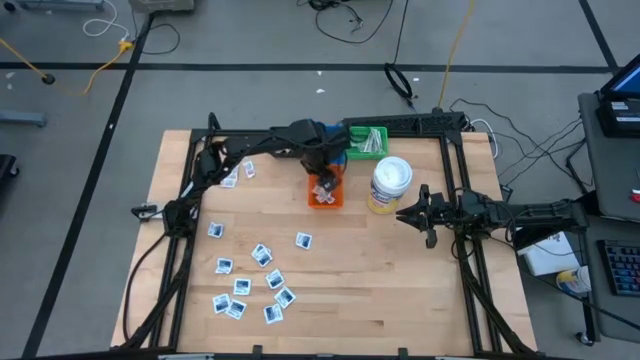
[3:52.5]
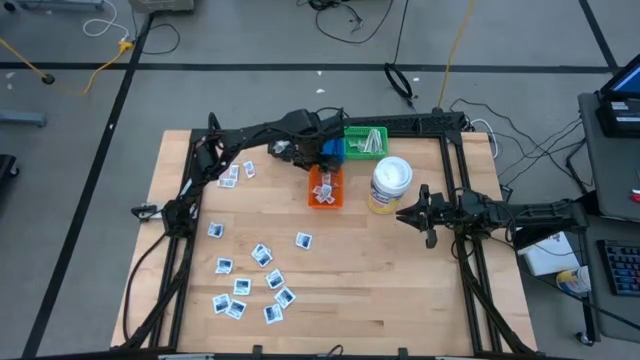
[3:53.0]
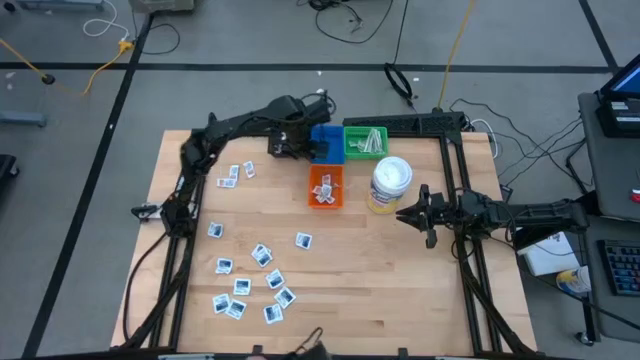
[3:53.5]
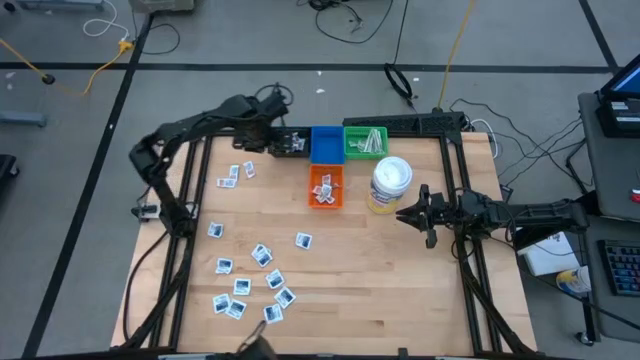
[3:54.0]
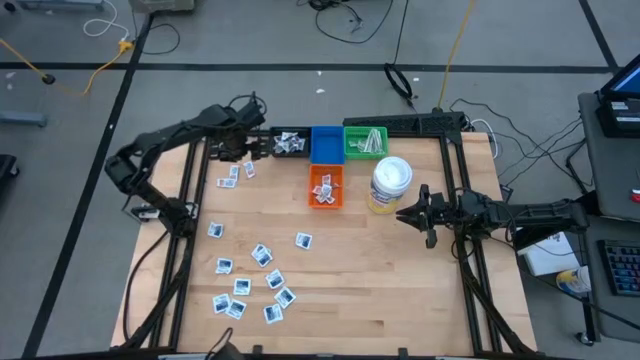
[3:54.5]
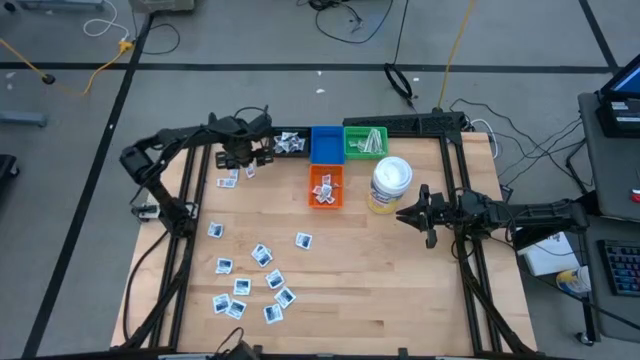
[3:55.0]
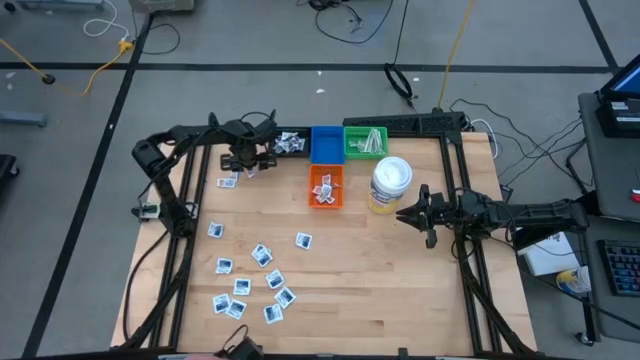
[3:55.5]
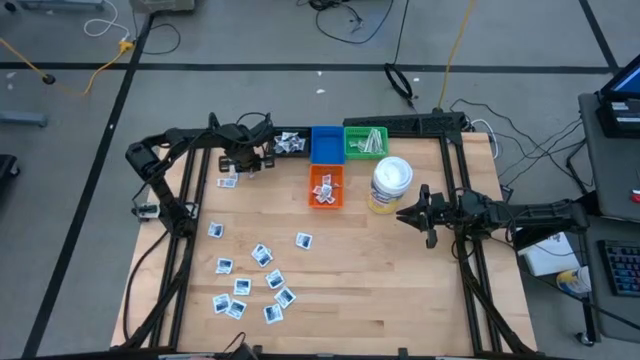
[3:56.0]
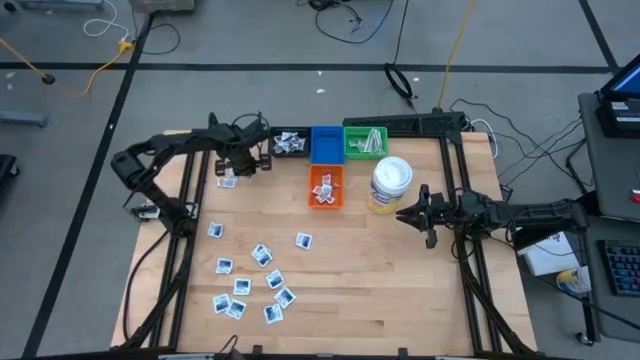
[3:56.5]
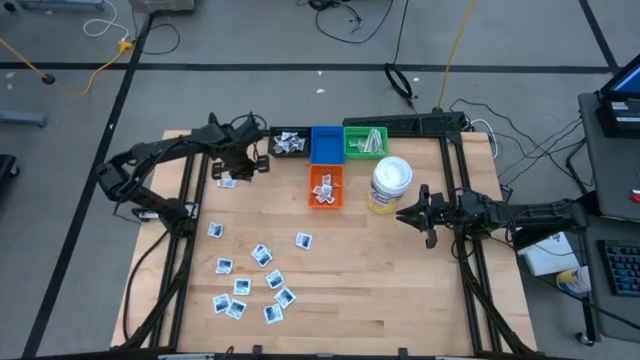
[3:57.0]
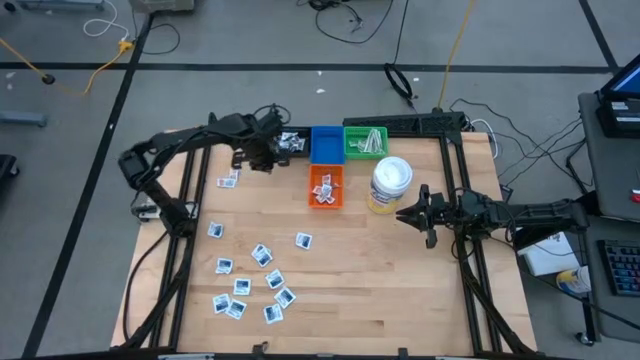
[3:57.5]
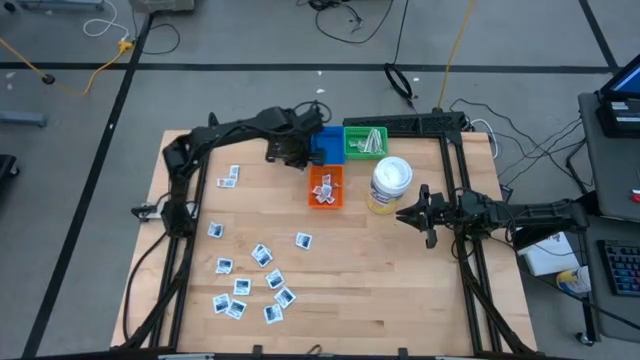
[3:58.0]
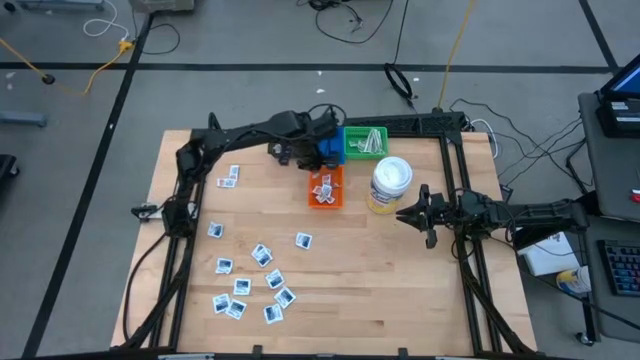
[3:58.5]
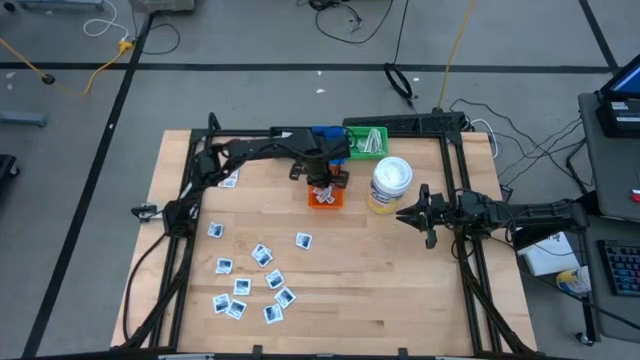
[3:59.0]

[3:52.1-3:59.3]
Task: Pick & Place First Aid Supplies
Put the orange ointment pack into the orange bin

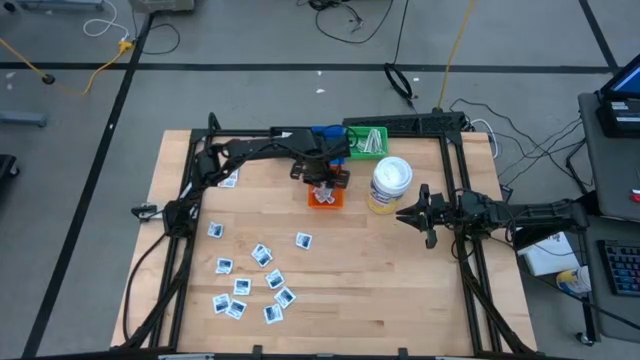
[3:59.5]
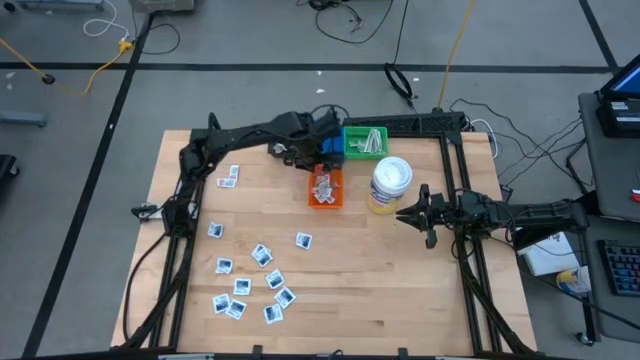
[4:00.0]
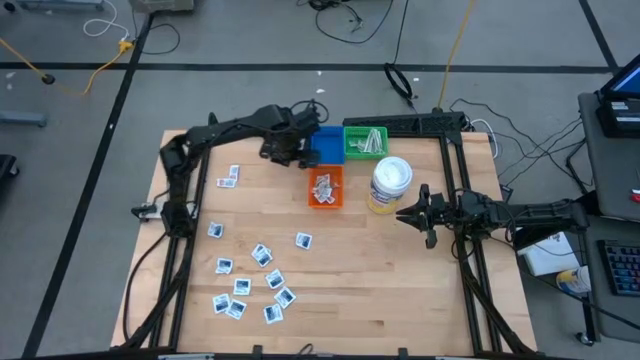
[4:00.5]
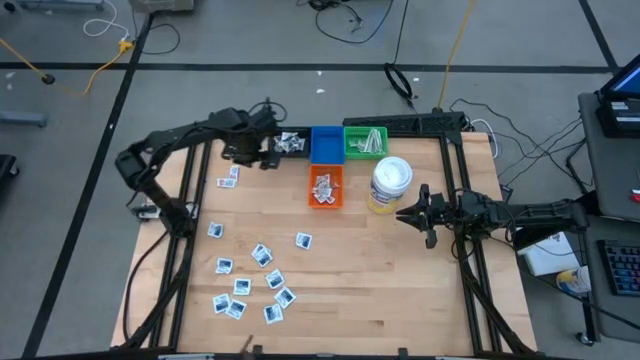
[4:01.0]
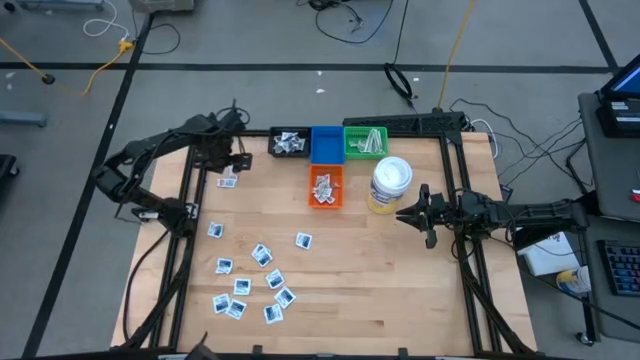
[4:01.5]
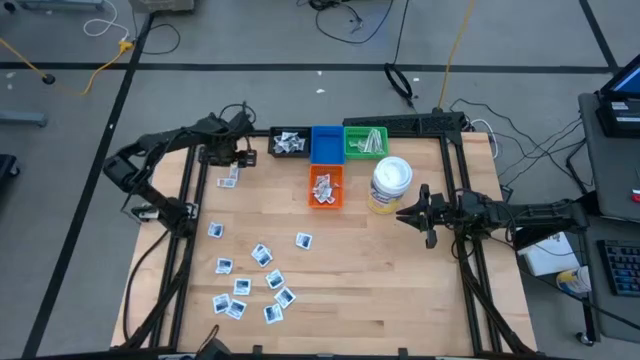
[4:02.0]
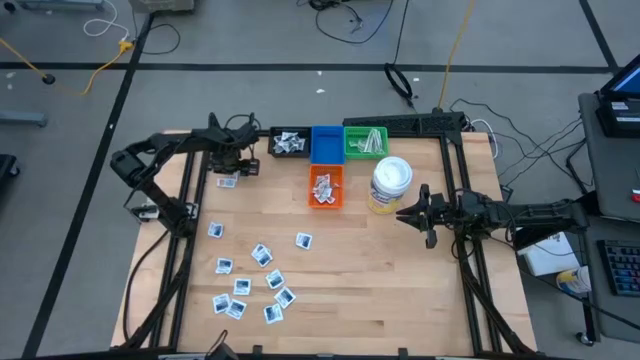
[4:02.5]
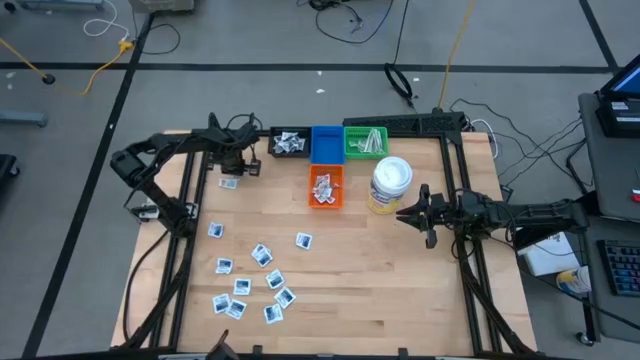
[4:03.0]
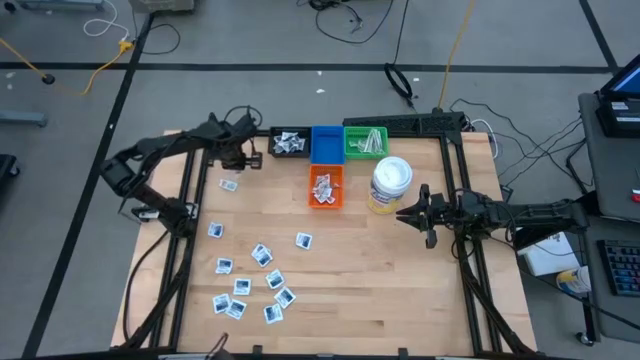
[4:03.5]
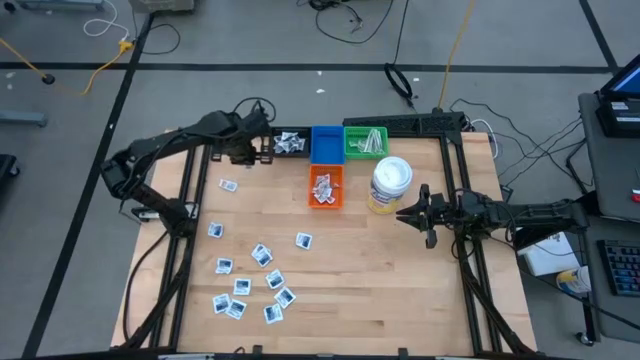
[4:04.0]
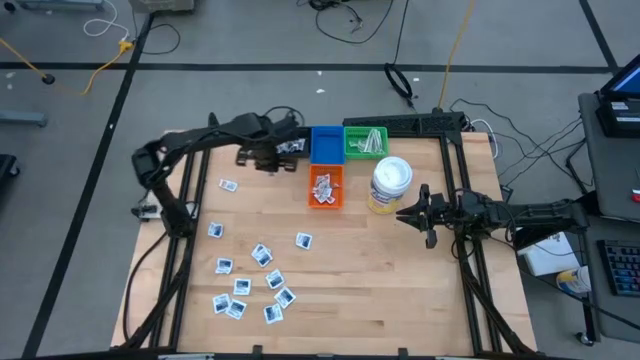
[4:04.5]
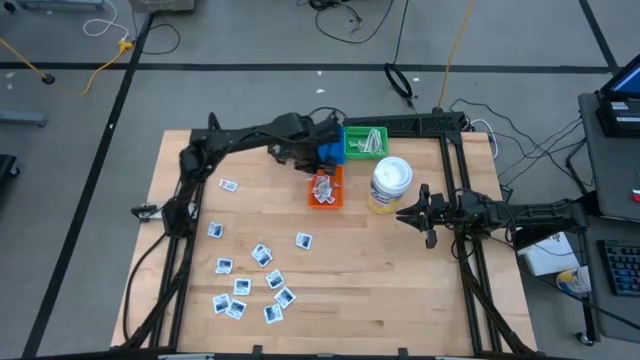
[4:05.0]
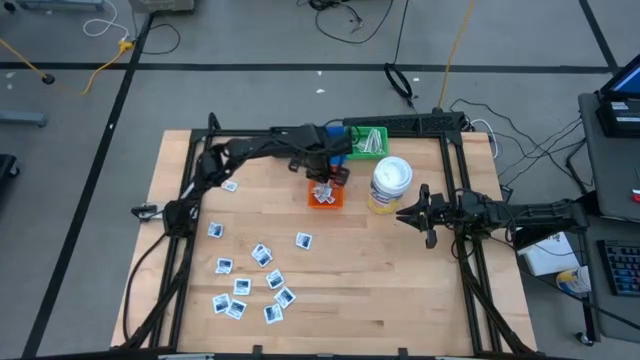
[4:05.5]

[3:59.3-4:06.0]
Put the orange ointment pack into the orange bin

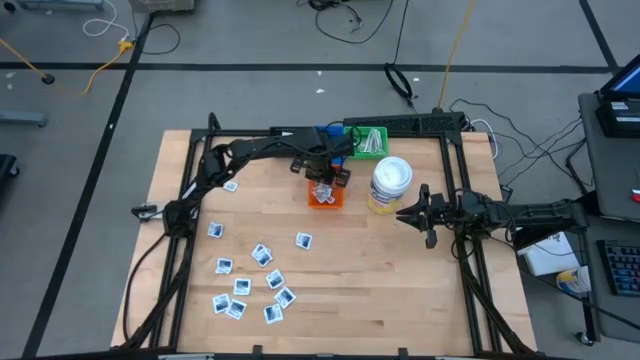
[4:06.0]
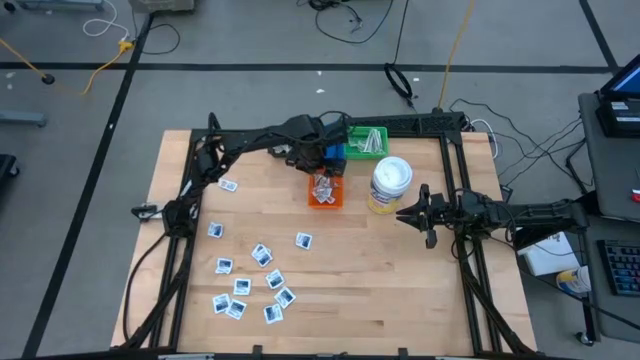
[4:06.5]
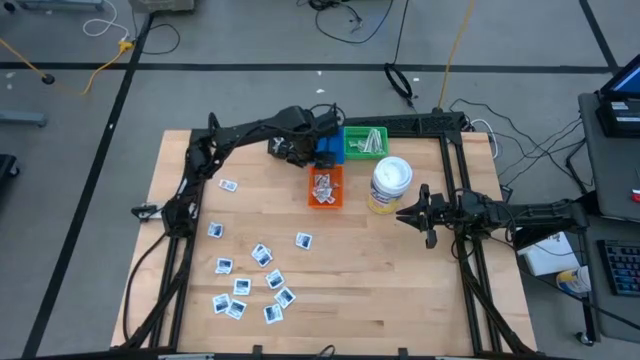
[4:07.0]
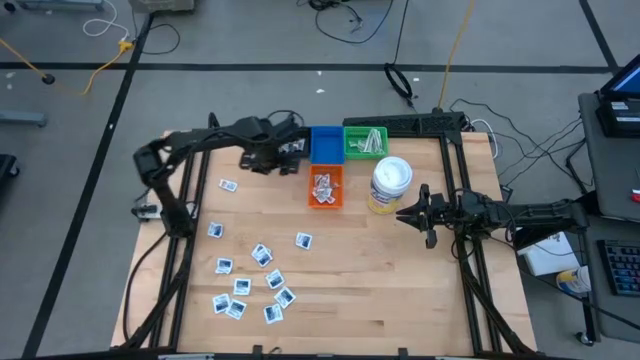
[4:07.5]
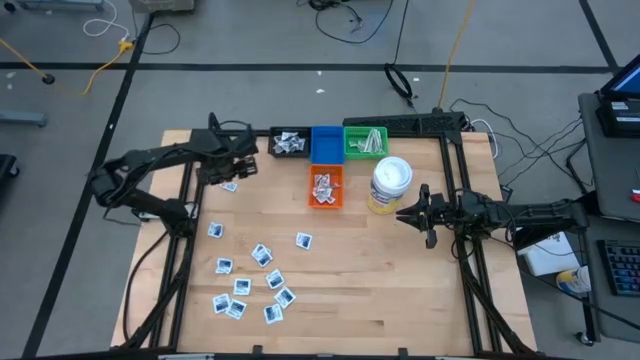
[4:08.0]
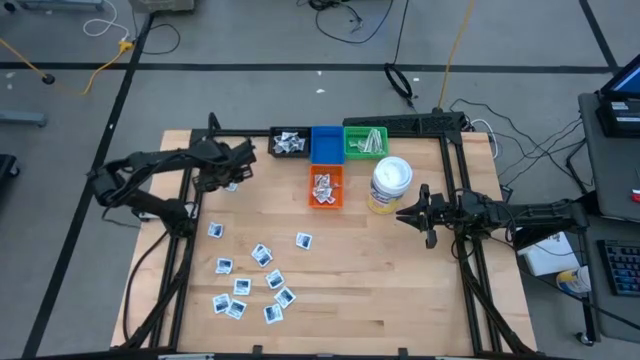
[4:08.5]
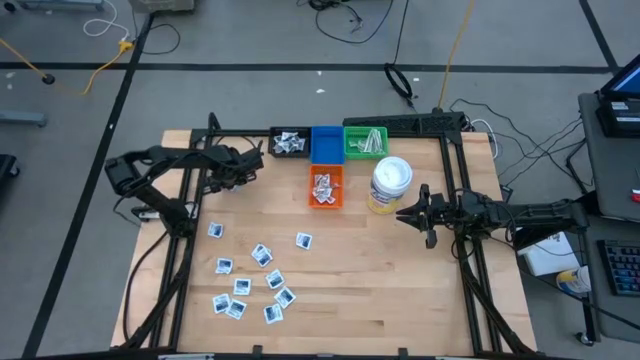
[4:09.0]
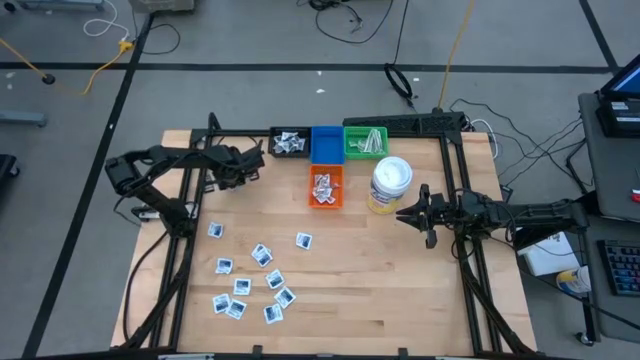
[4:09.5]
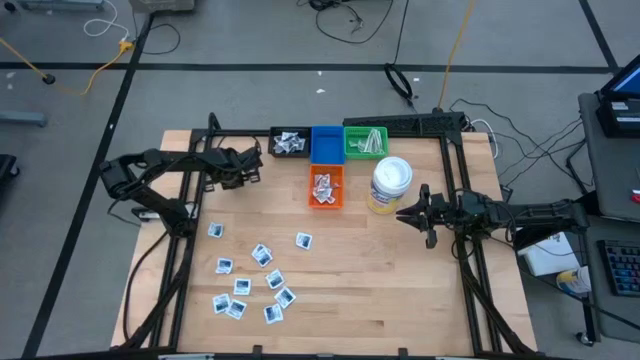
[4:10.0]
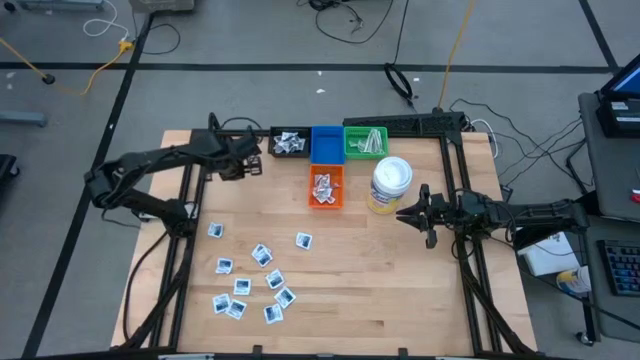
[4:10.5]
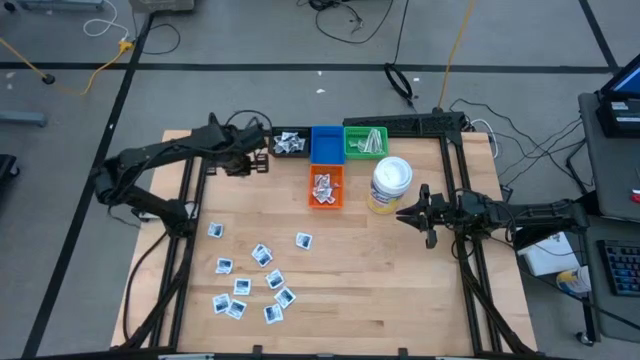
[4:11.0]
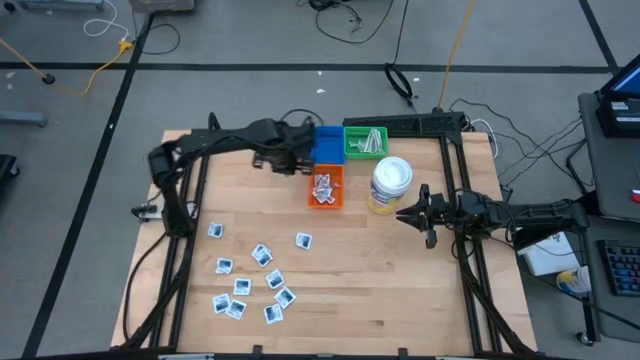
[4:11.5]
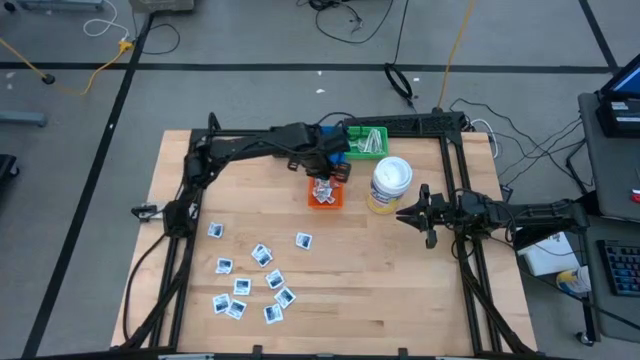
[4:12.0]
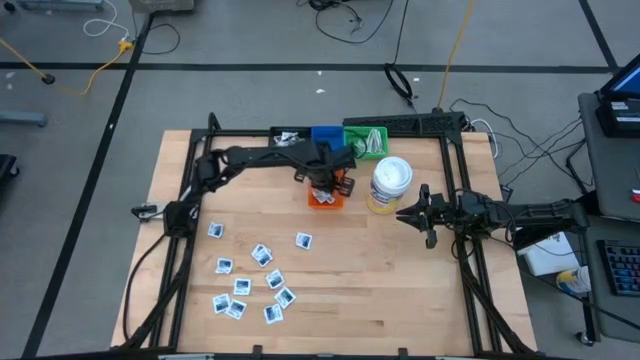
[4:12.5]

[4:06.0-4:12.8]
Put the orange ointment pack into the orange bin

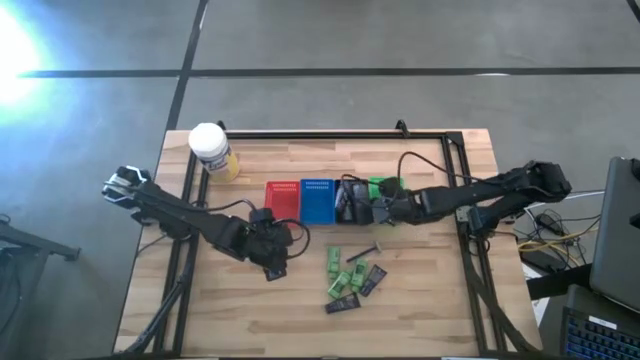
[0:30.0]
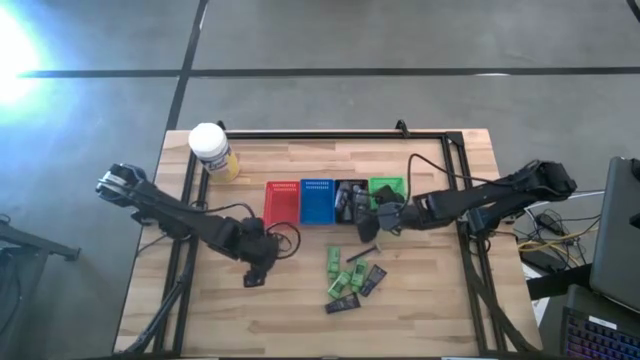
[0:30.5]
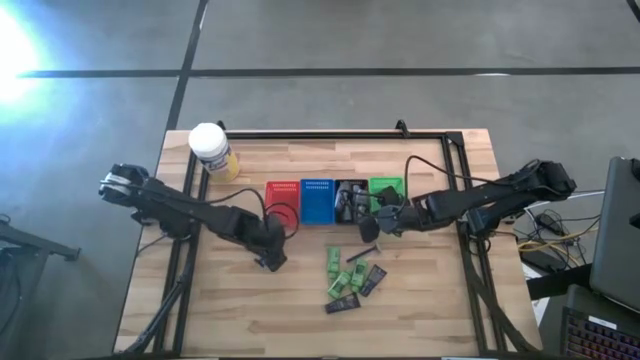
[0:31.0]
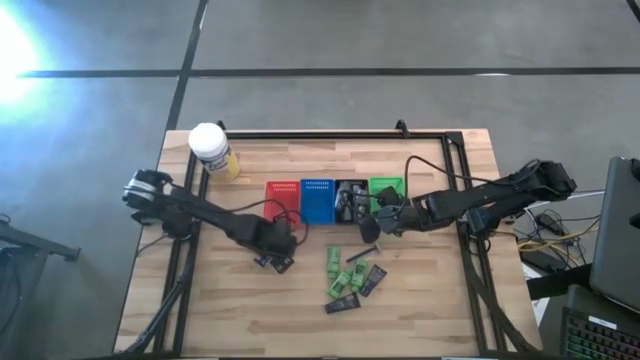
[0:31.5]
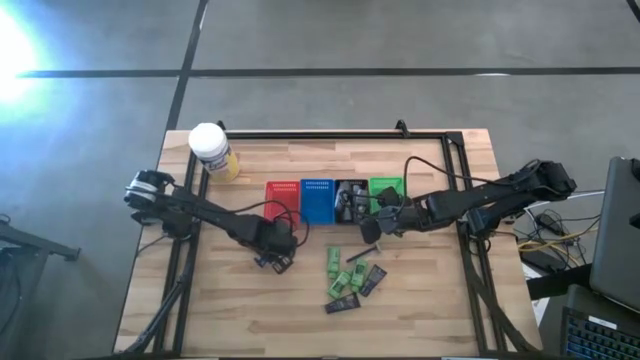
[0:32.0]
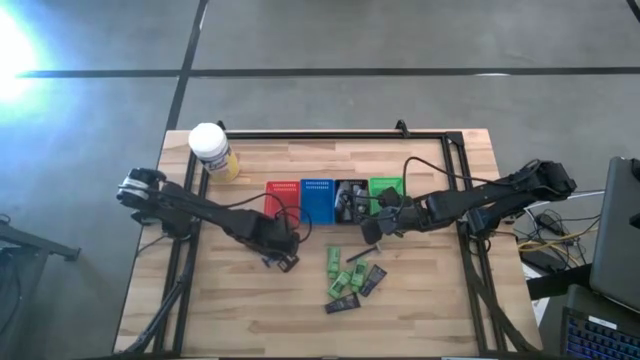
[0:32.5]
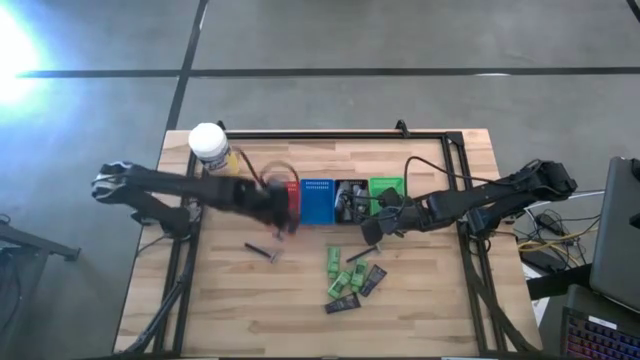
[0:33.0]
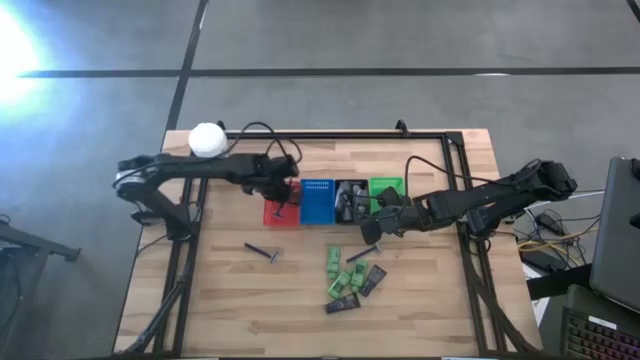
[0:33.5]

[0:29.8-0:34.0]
Task: Pick & Place Travel size toiletries
Put the blue razor into the red bin
